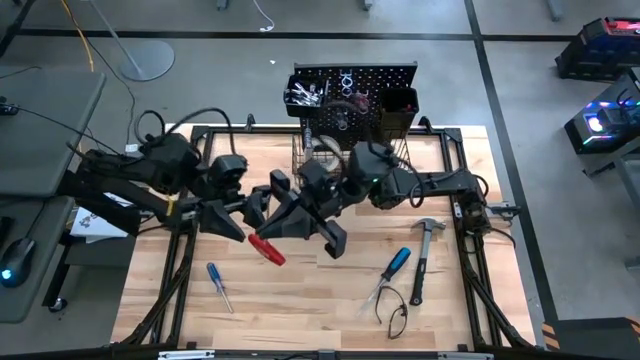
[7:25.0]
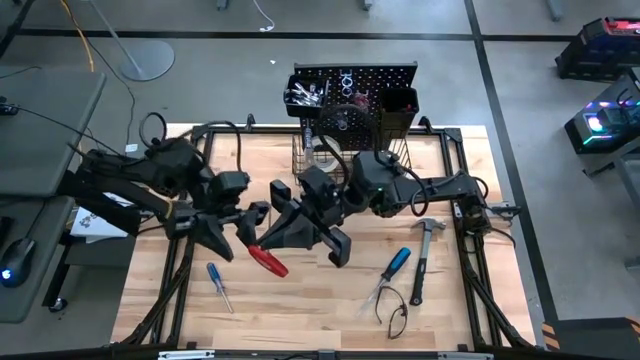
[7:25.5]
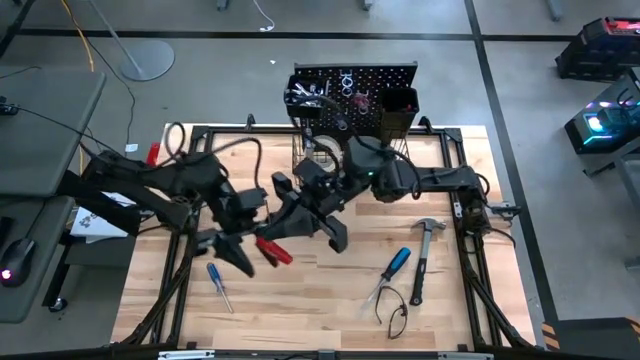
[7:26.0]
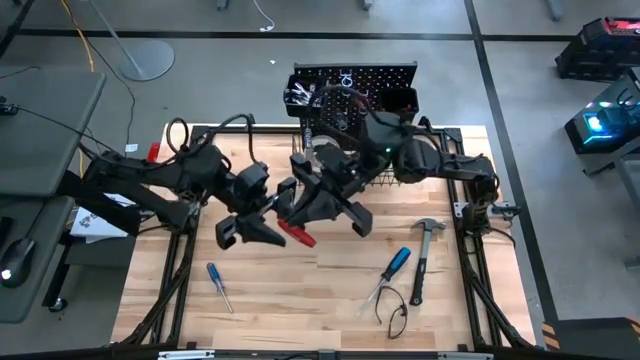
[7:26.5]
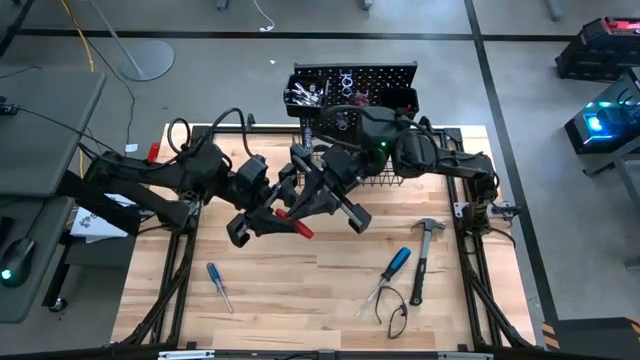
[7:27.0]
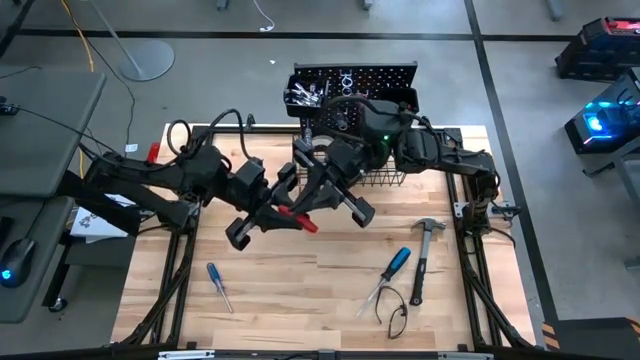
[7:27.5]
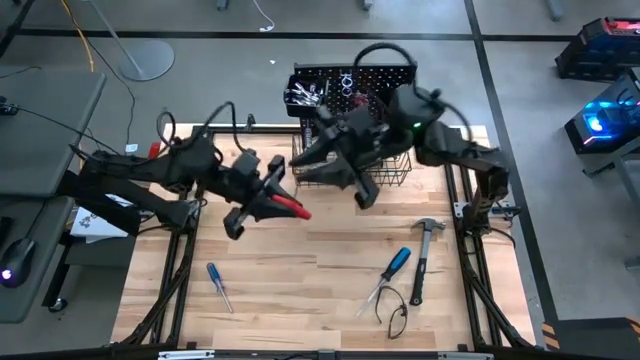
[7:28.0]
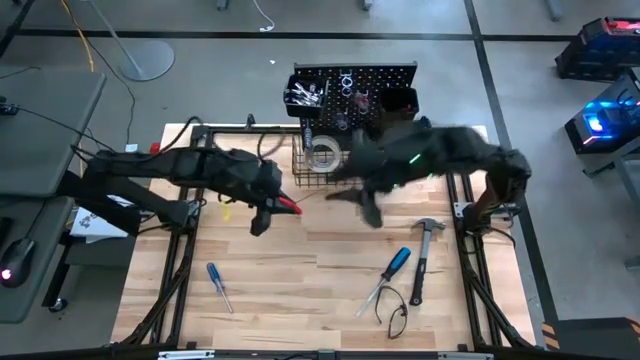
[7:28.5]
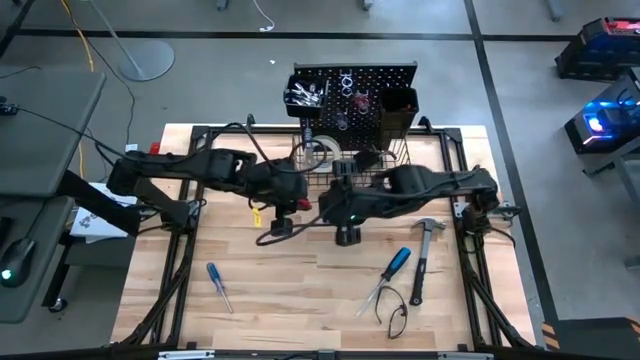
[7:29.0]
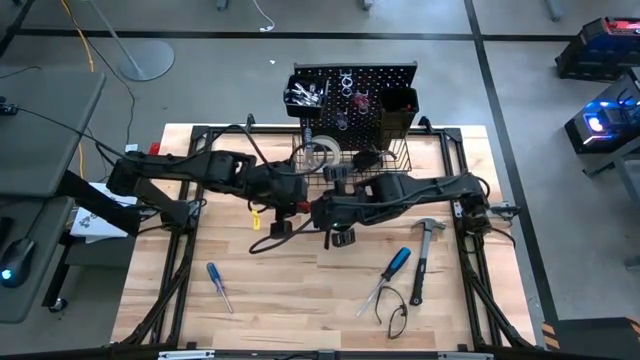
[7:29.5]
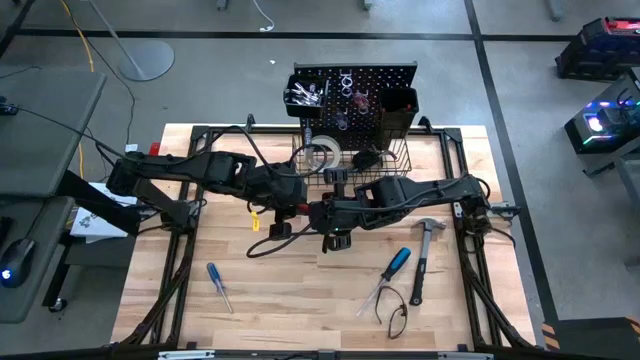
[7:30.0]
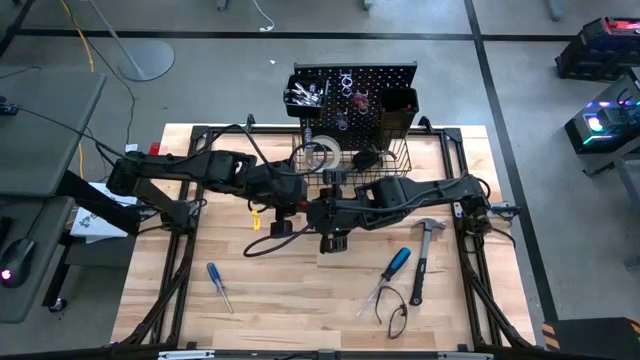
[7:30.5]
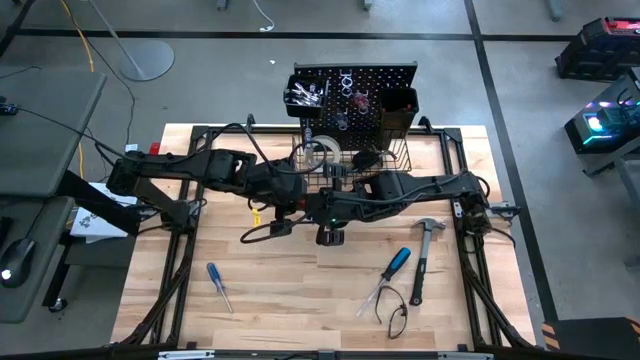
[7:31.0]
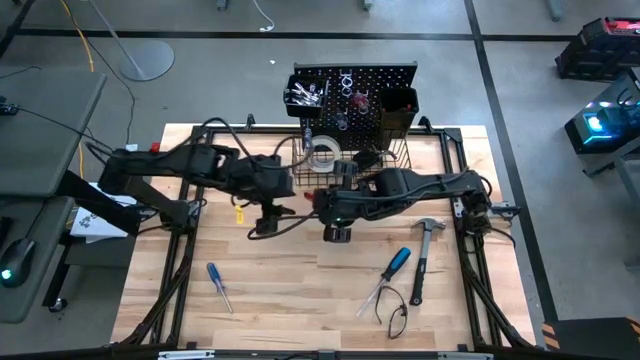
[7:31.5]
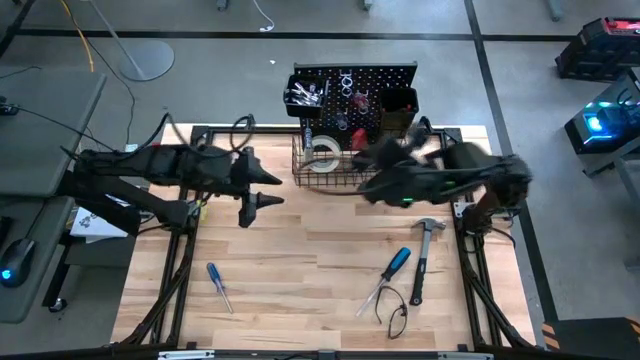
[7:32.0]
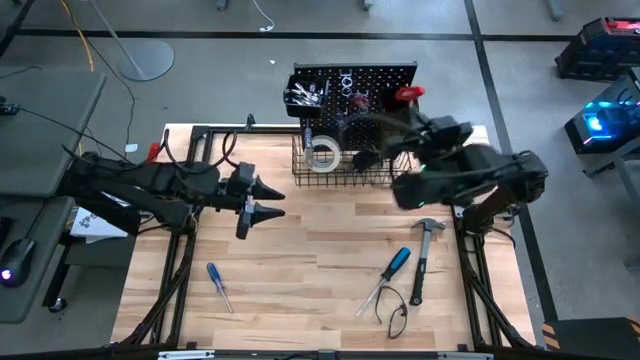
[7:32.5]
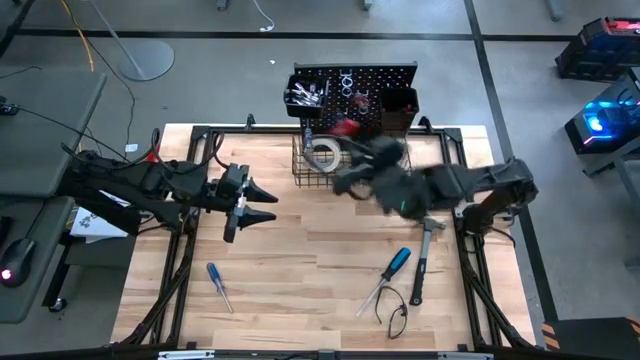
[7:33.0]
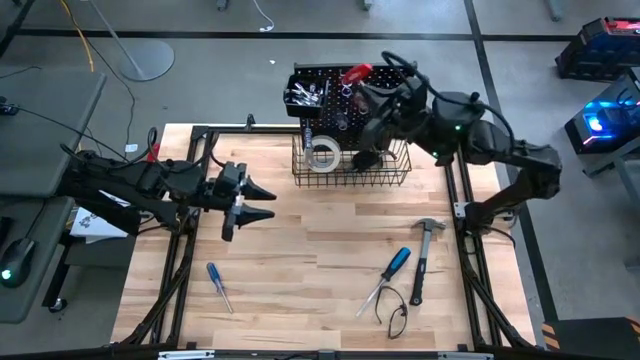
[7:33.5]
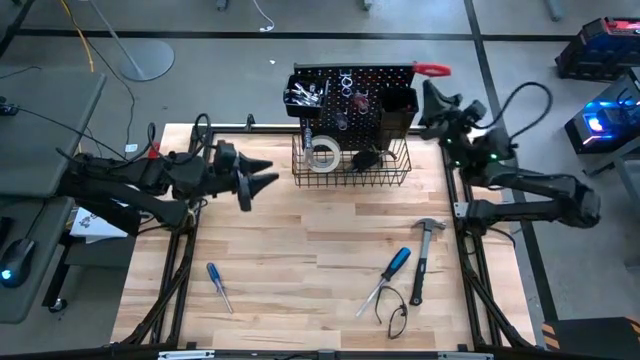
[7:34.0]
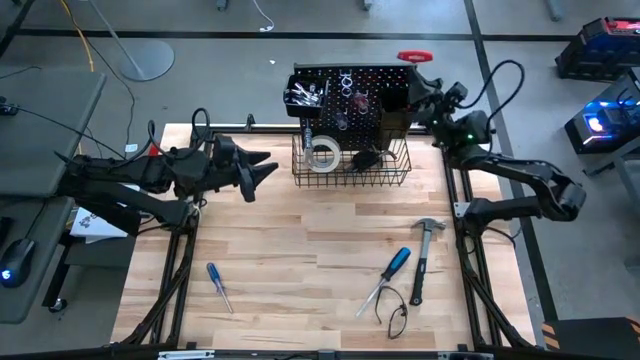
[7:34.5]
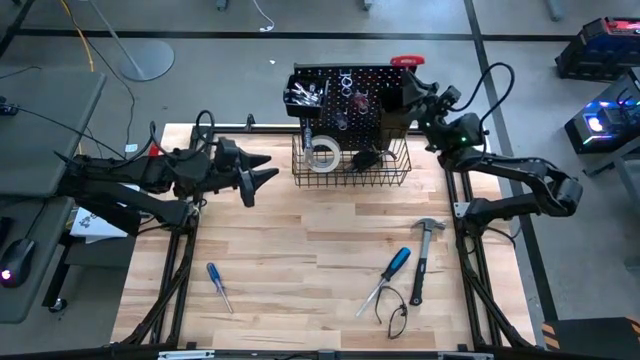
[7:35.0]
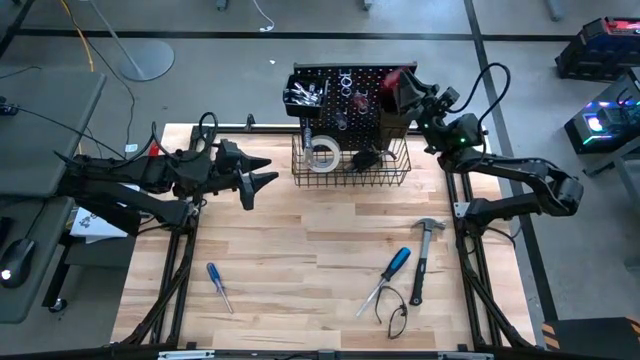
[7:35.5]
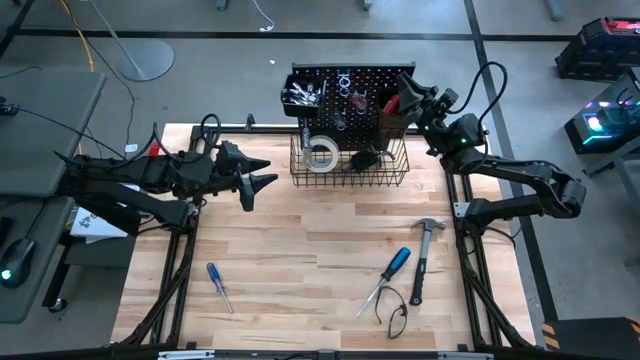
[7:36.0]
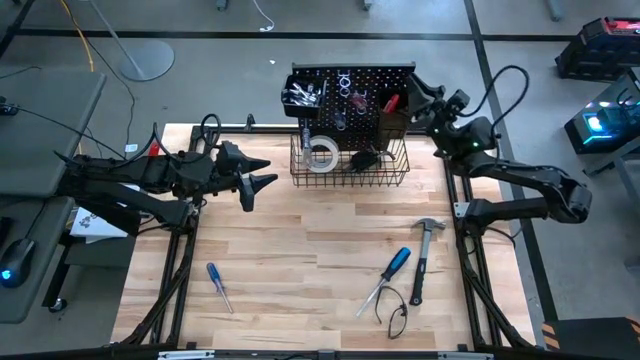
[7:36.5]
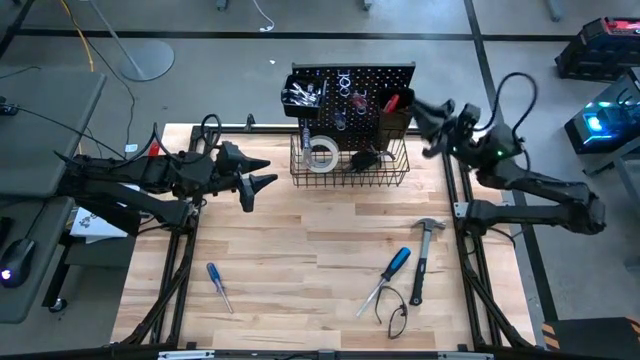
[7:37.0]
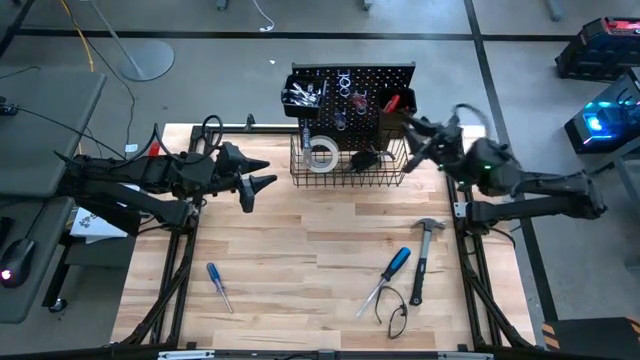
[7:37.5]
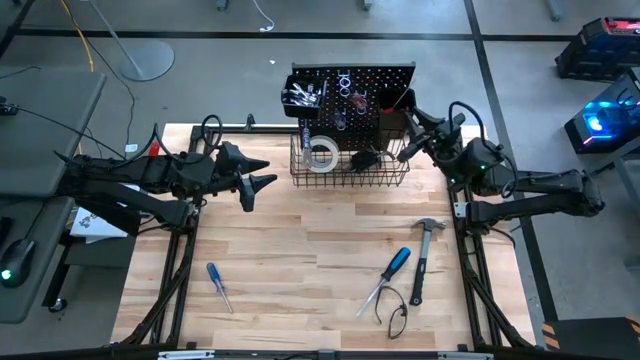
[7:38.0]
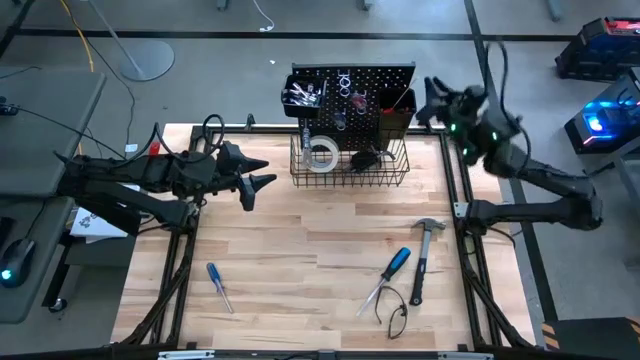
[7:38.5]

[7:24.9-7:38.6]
Task: Hang tools onto peg board
Put the red allen wrench in the right black bin on the pegboard

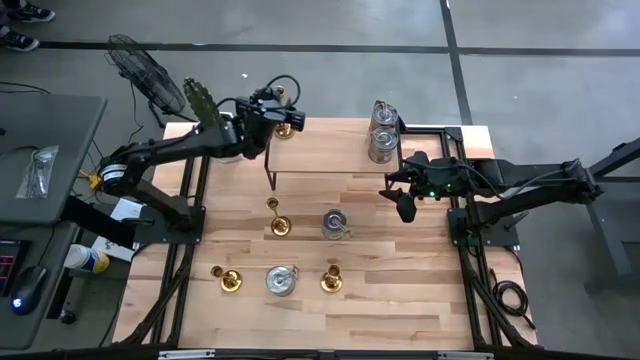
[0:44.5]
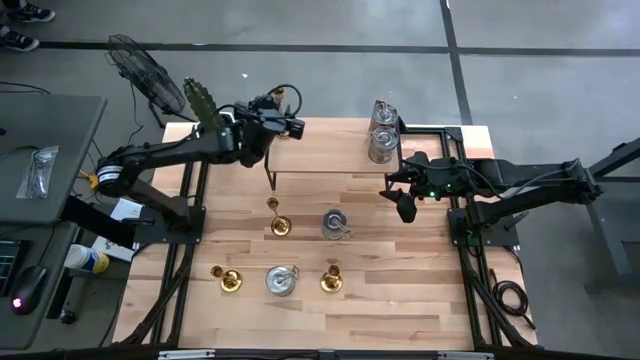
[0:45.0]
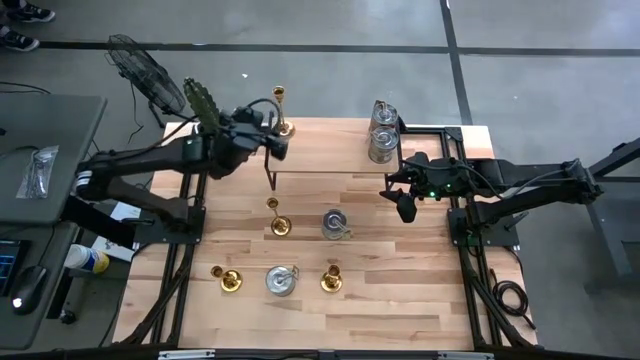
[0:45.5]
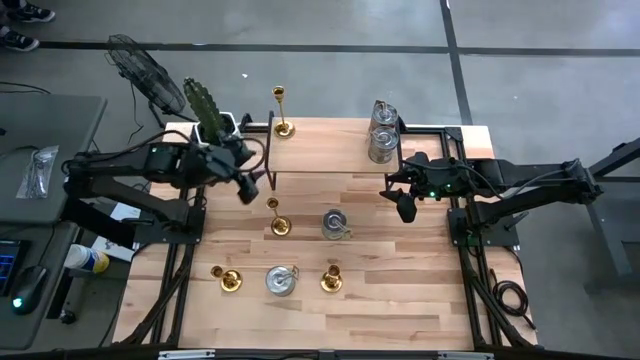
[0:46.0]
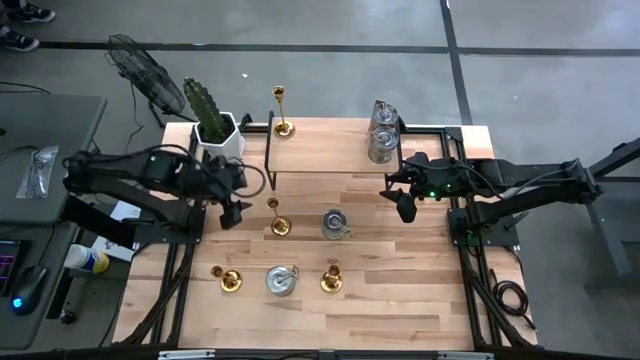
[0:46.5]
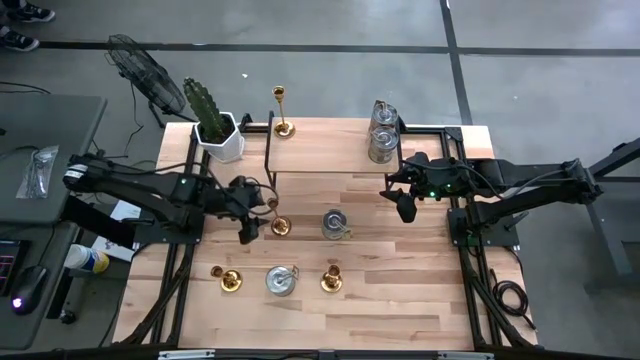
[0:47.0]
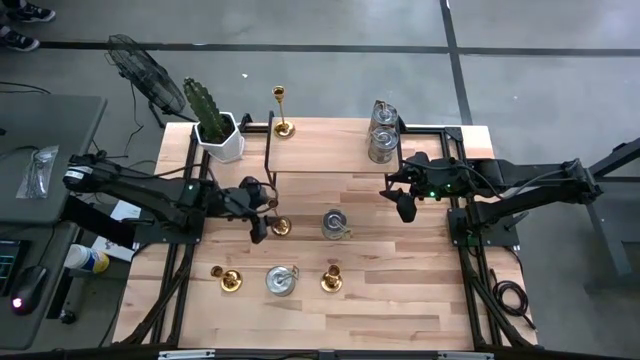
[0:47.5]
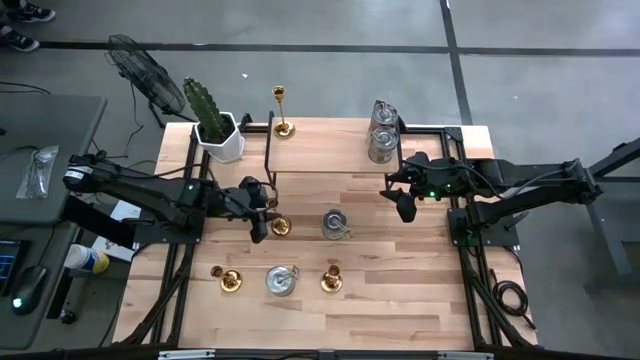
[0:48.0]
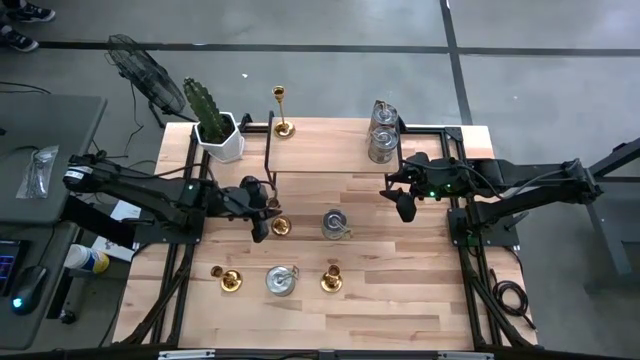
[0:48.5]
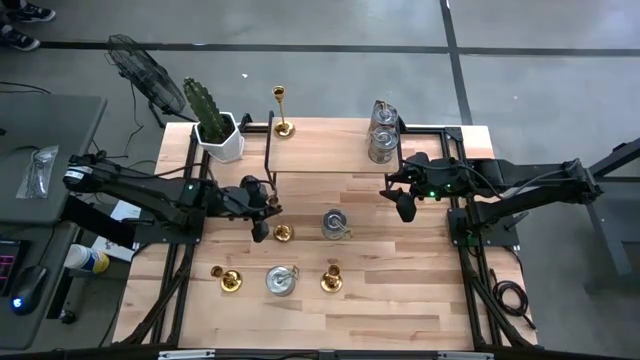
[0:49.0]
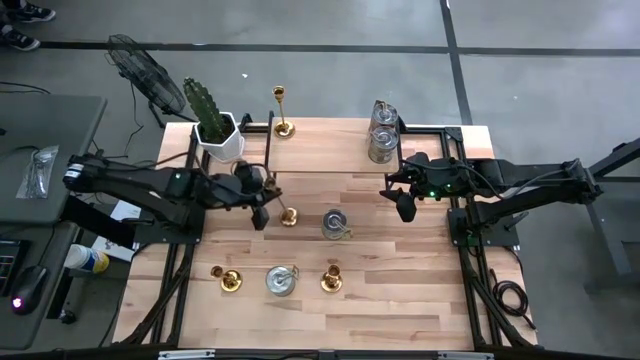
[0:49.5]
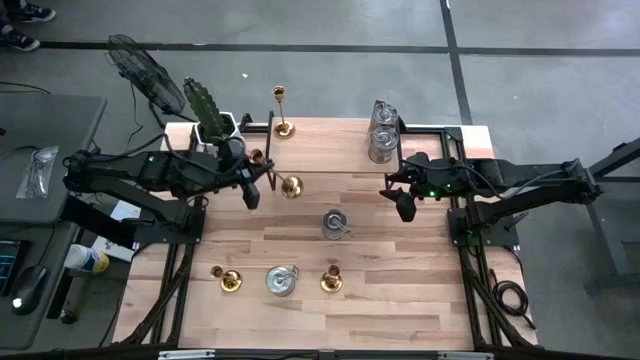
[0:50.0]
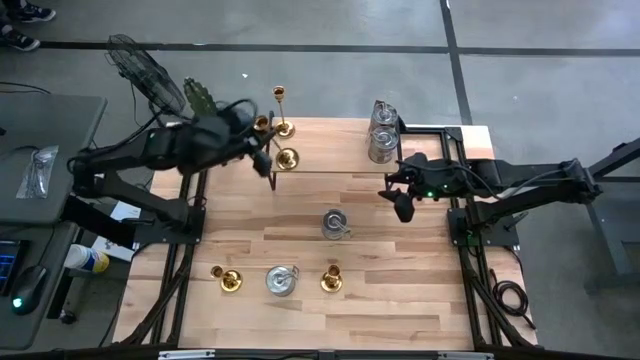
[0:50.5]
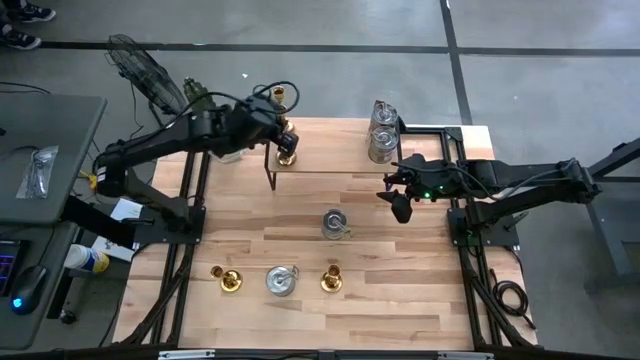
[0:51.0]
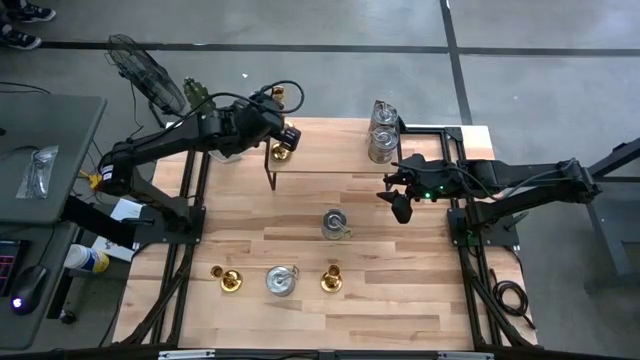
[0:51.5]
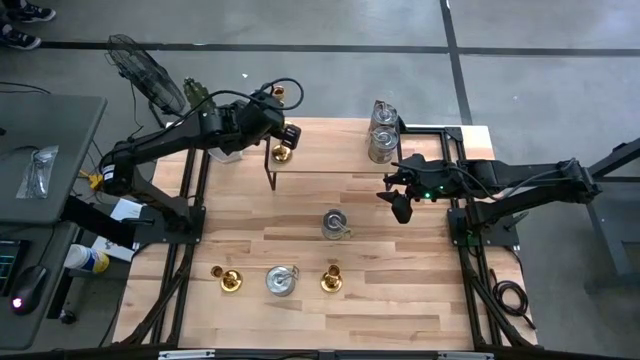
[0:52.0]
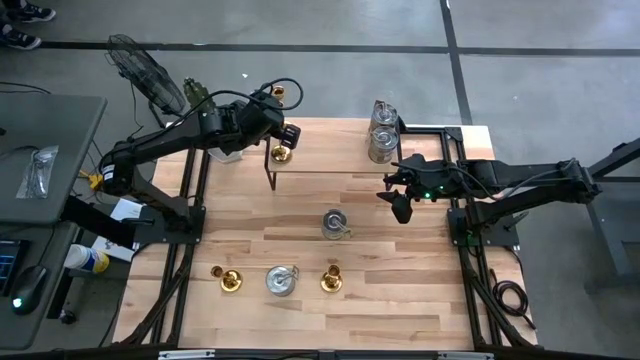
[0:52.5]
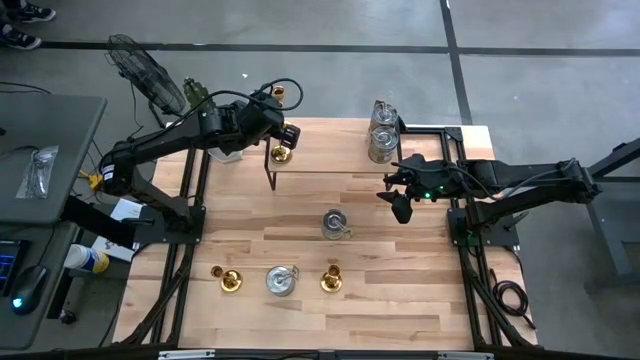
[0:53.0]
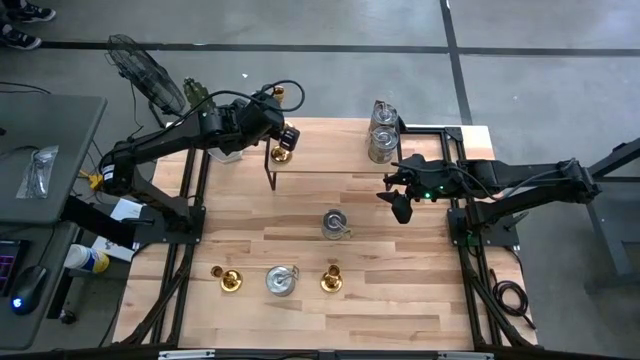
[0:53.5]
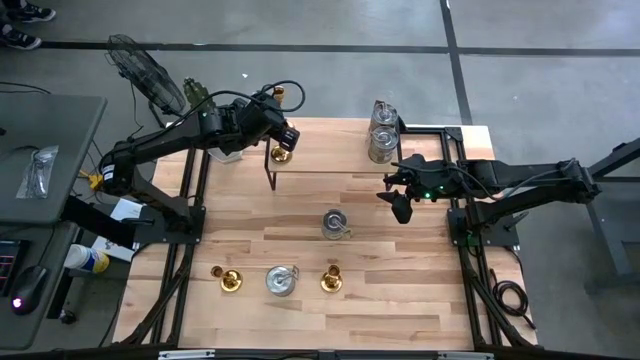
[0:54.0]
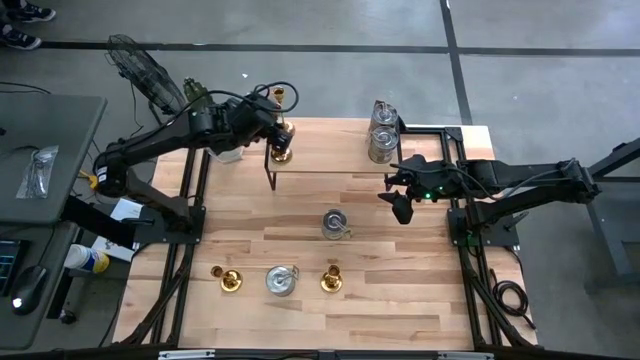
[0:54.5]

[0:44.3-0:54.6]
Task: Pick & Place candle stick holders
Align the gold candle holder with the other gold candle holder on the shelf
